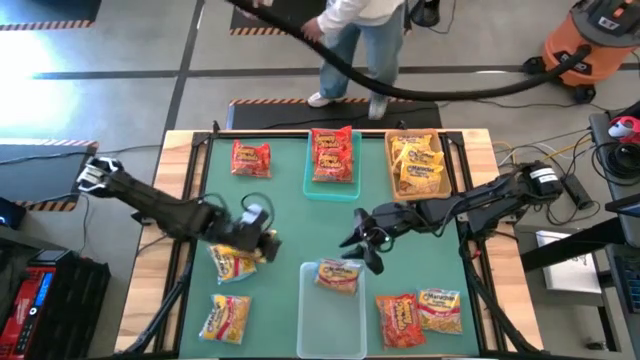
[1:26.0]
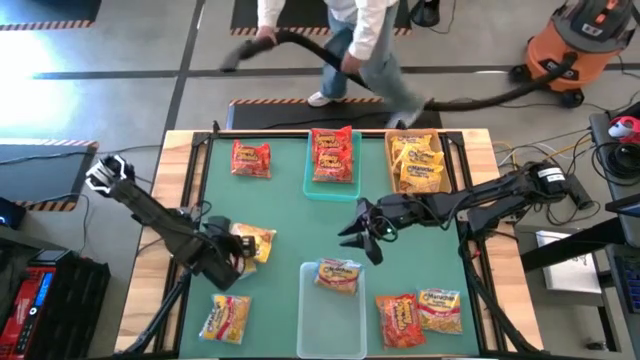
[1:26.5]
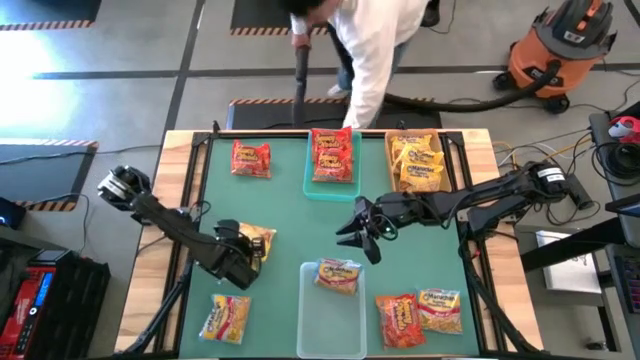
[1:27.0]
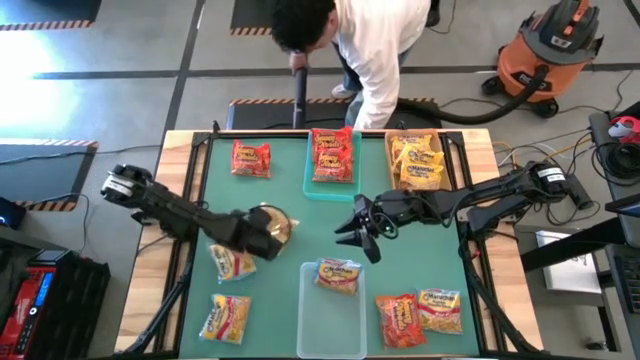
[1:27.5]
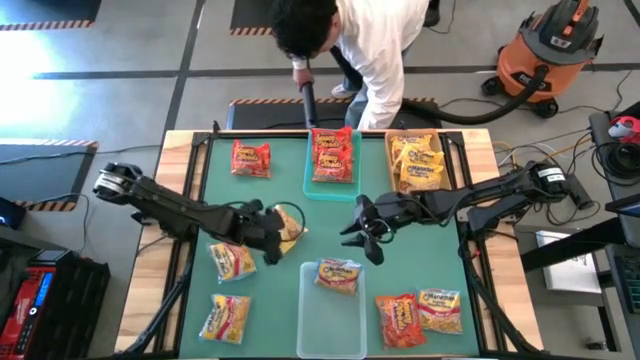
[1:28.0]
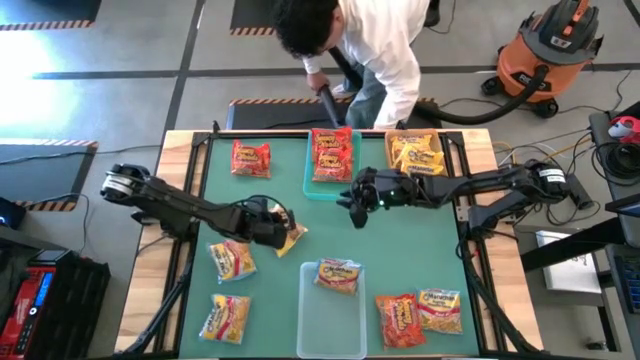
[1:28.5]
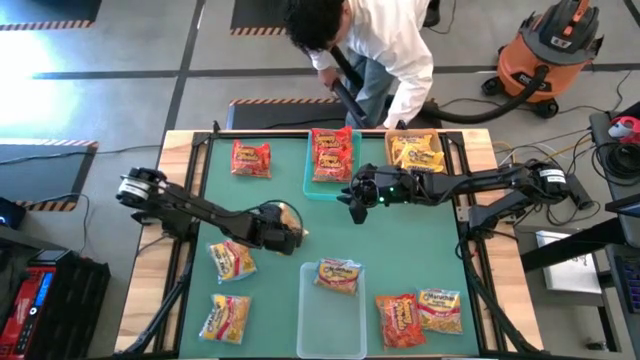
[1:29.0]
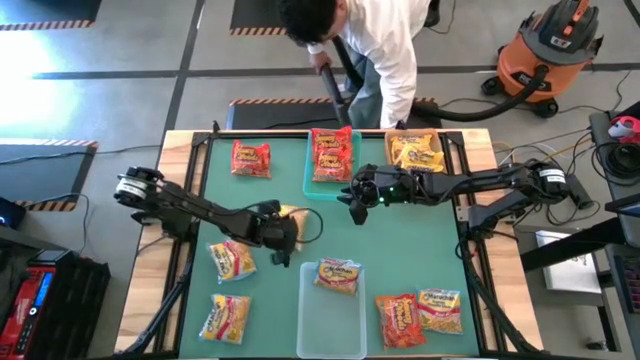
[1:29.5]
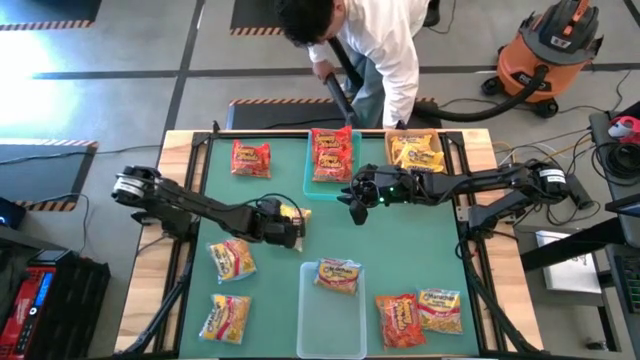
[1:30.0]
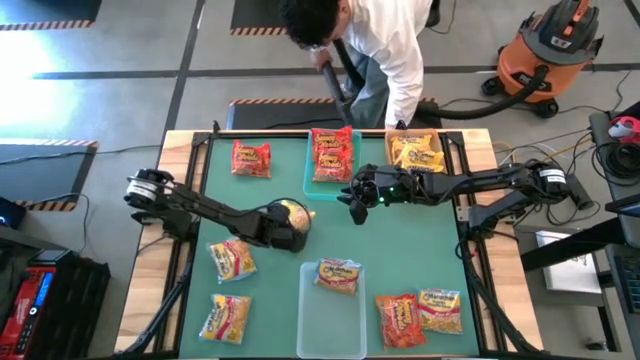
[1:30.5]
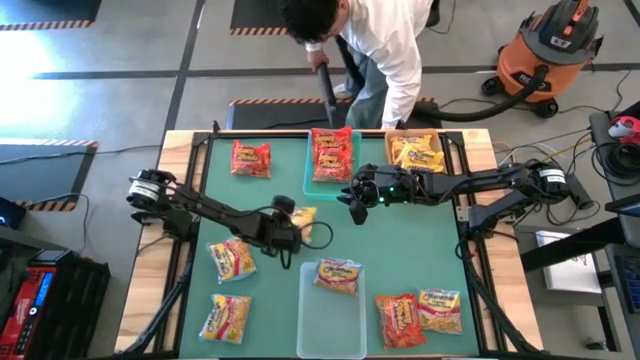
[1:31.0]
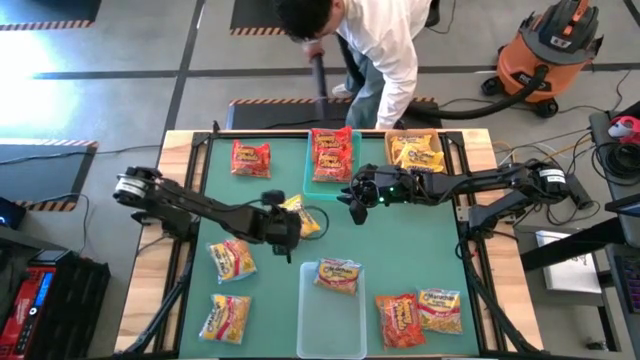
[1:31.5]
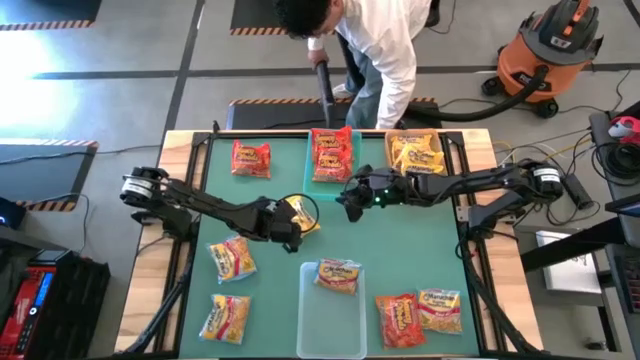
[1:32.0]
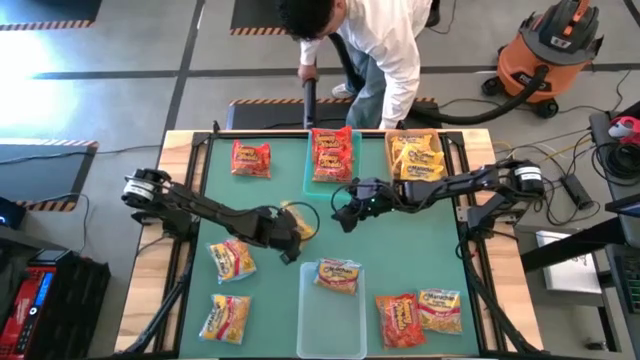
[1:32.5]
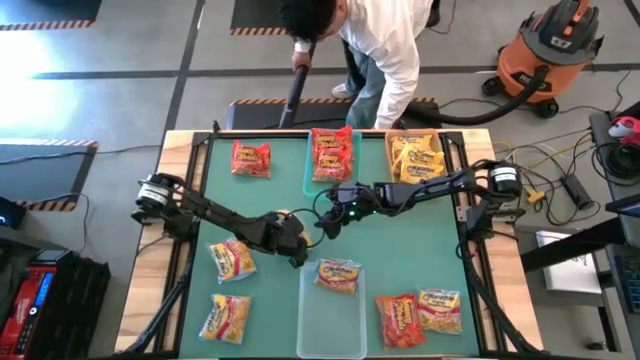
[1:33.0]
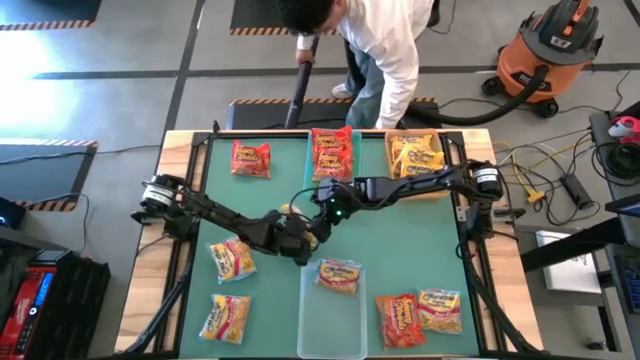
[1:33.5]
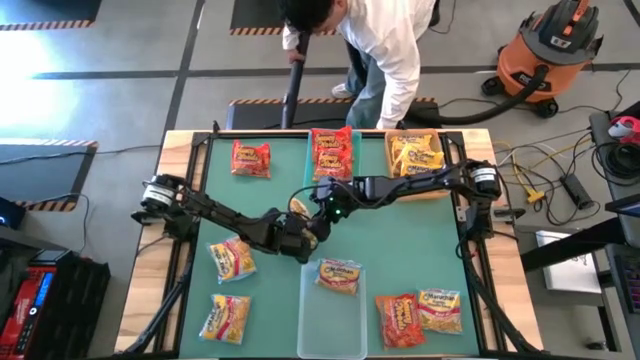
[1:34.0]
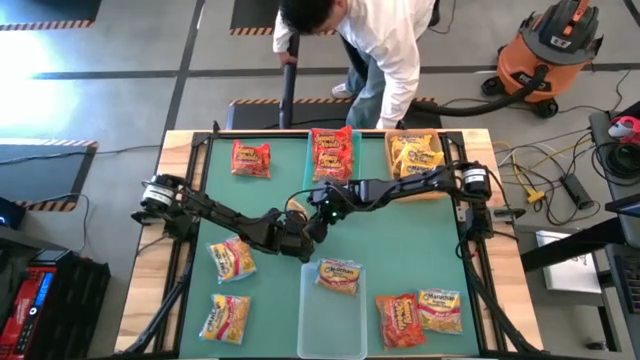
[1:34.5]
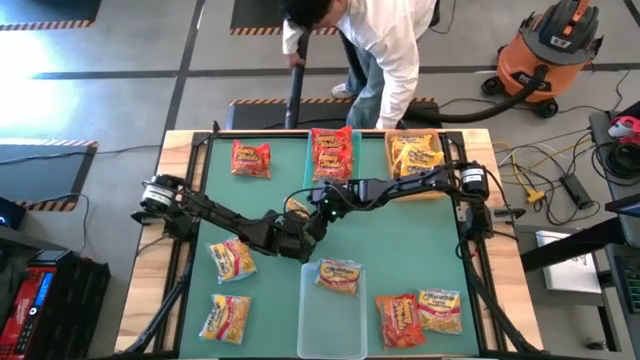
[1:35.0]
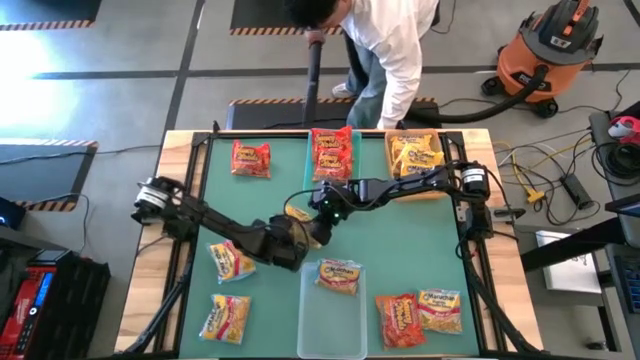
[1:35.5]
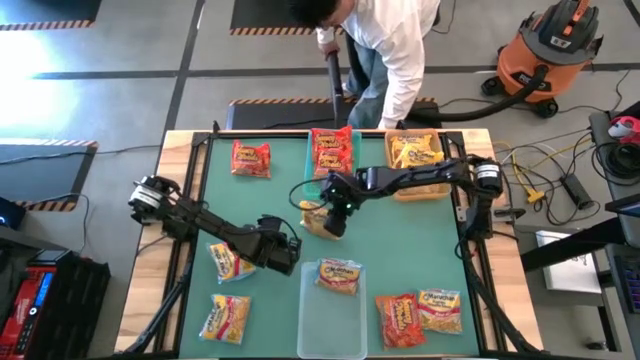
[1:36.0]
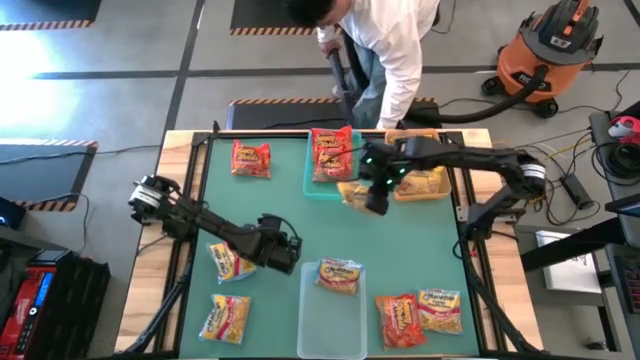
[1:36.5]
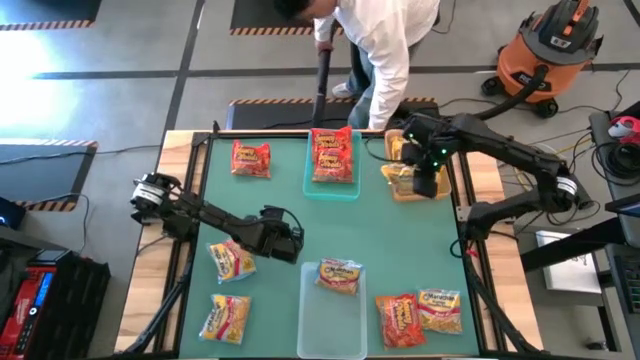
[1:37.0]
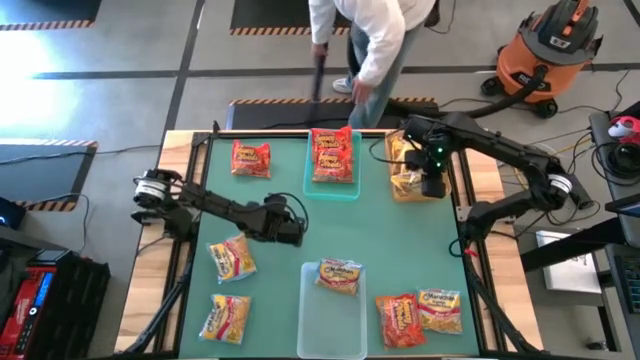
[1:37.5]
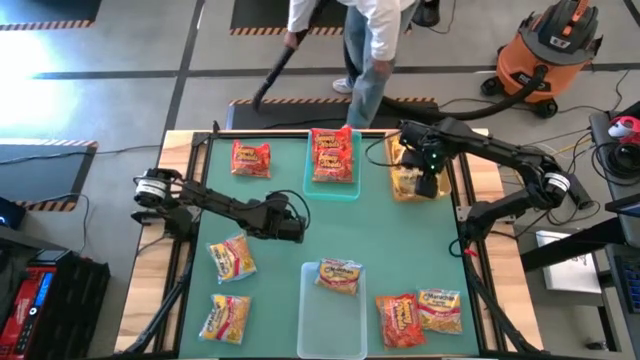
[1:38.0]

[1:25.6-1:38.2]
Task: Sort Maruchan noodles
Put the yellow noodle pack into the orange bin

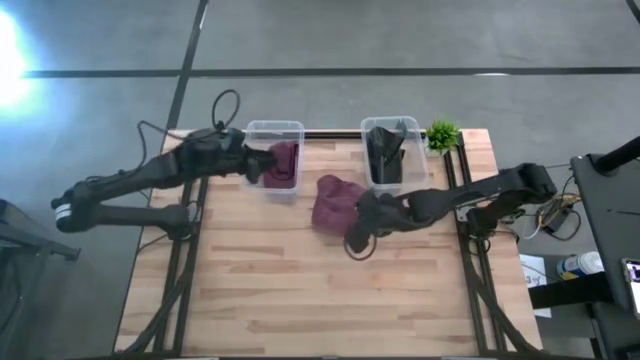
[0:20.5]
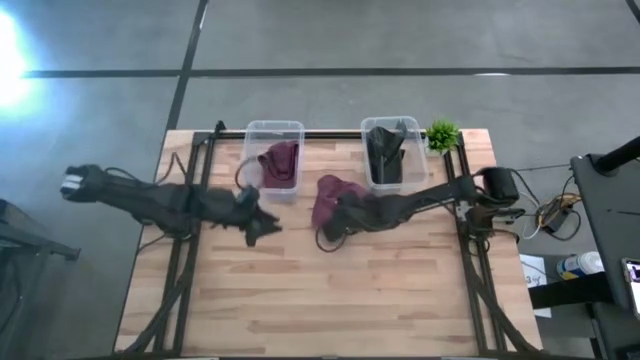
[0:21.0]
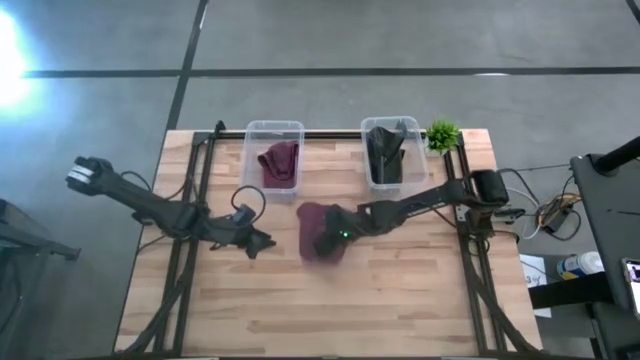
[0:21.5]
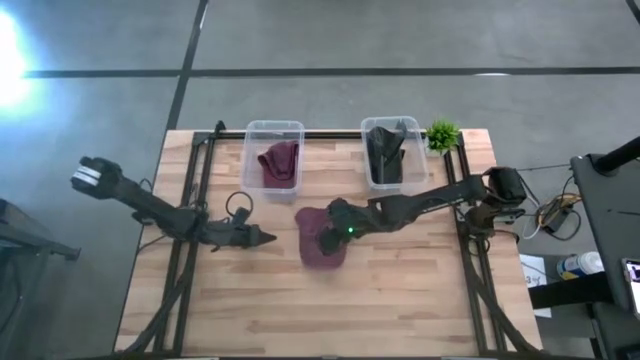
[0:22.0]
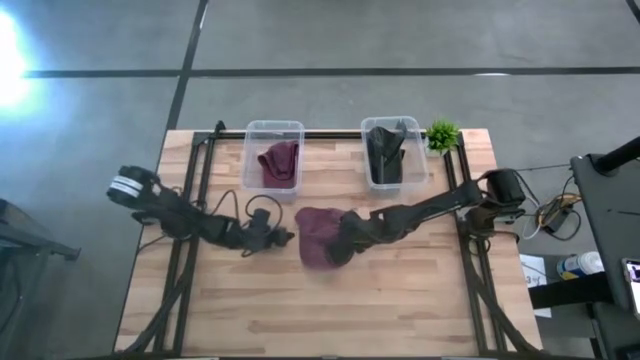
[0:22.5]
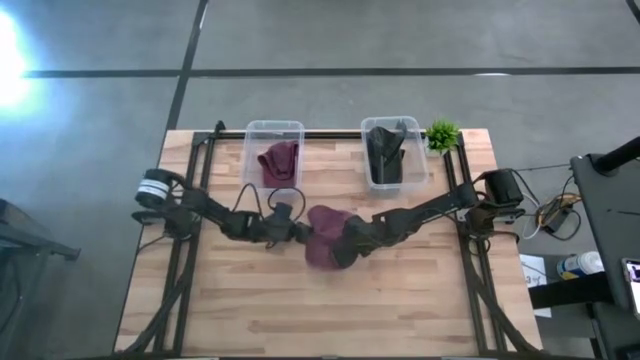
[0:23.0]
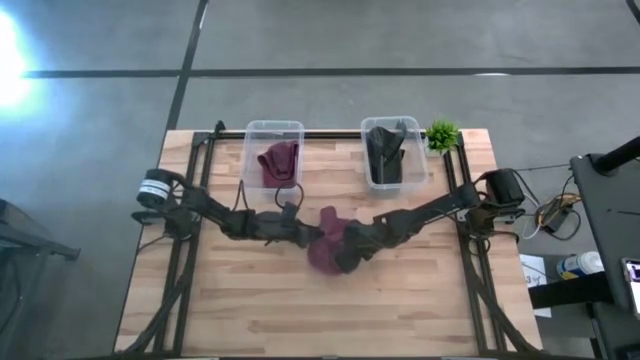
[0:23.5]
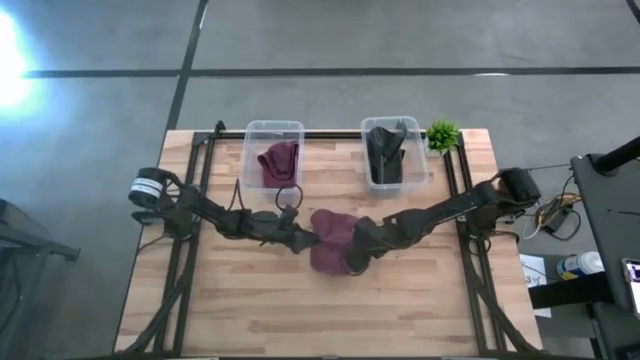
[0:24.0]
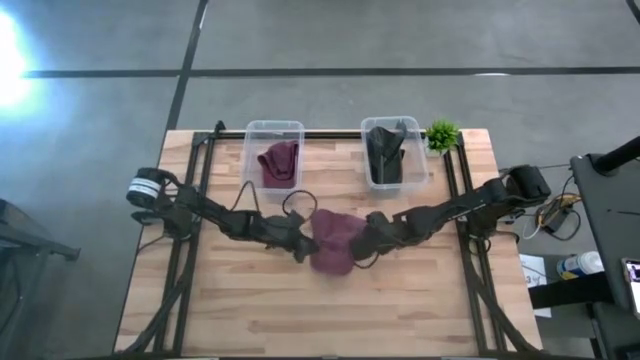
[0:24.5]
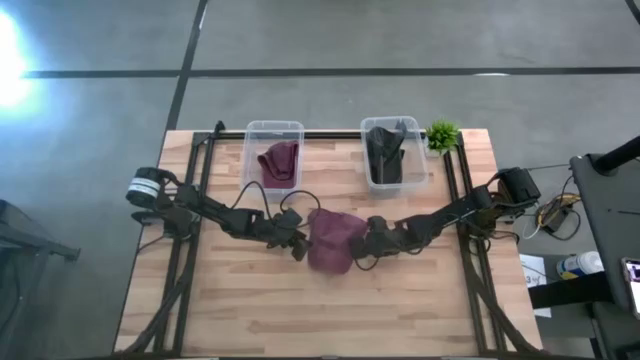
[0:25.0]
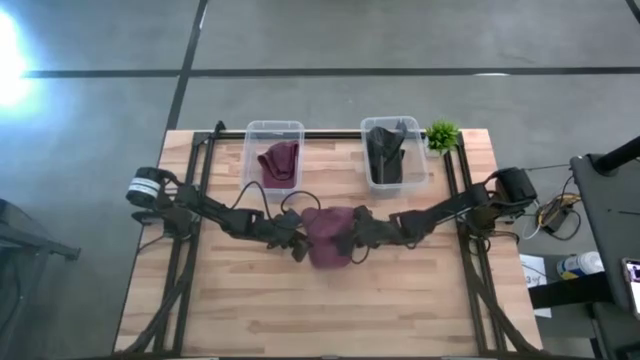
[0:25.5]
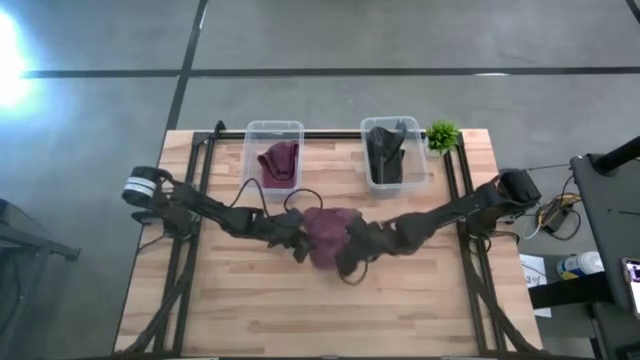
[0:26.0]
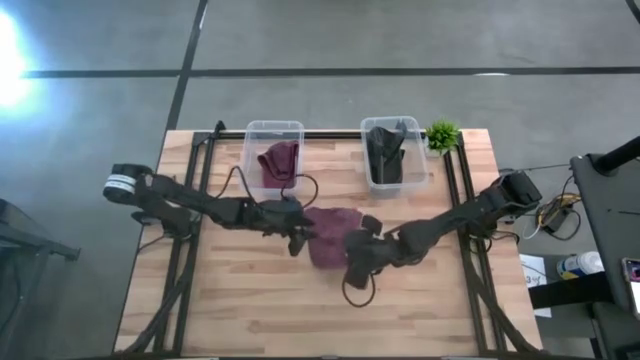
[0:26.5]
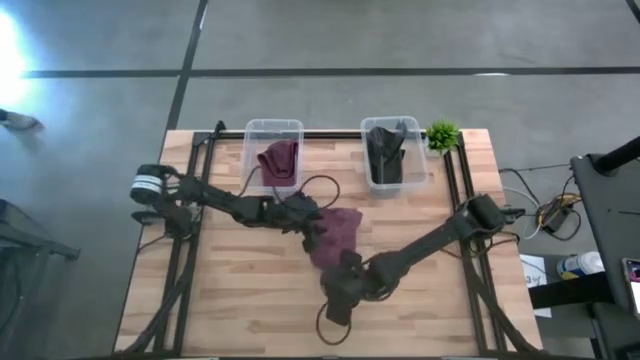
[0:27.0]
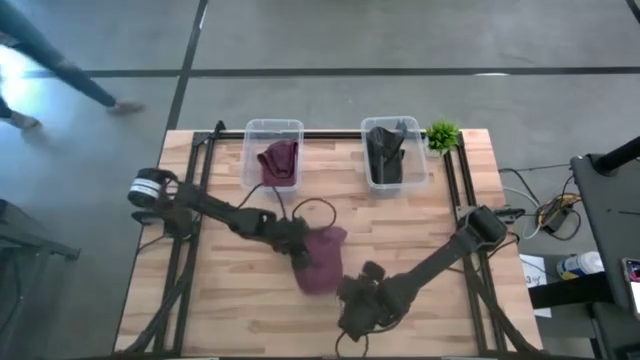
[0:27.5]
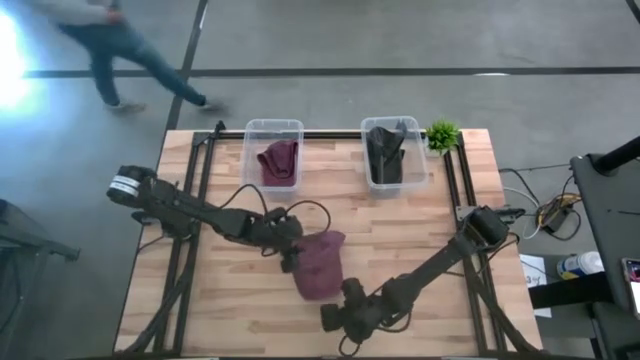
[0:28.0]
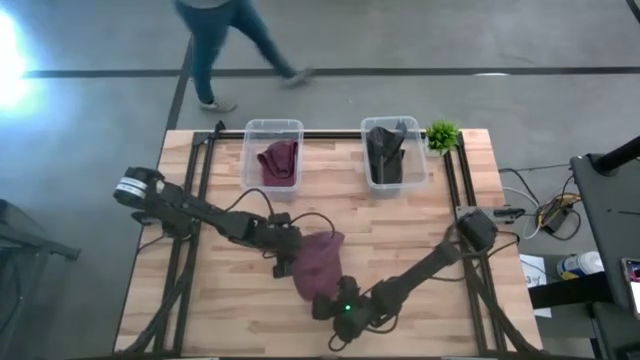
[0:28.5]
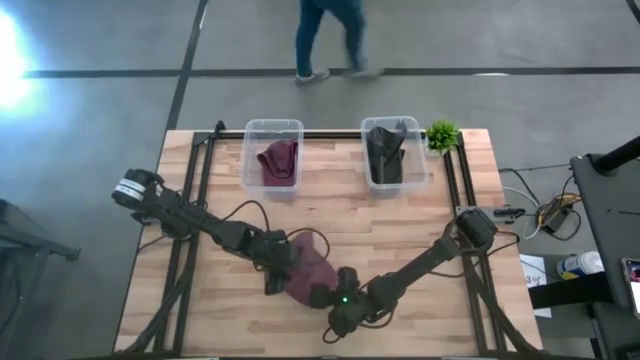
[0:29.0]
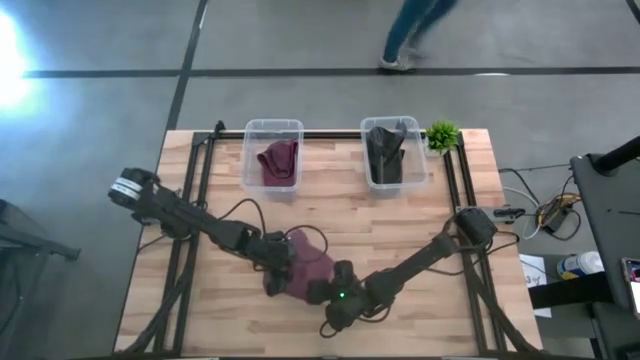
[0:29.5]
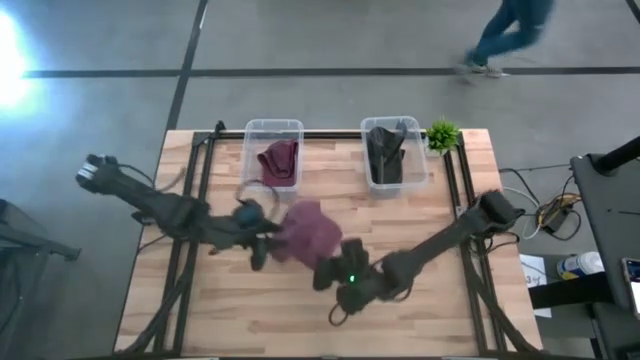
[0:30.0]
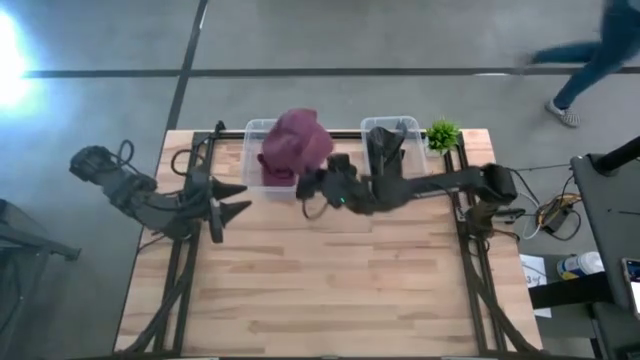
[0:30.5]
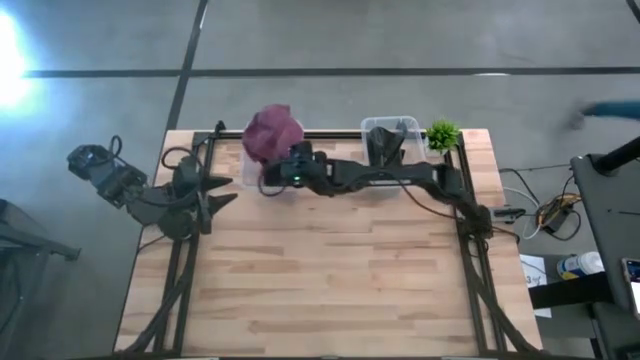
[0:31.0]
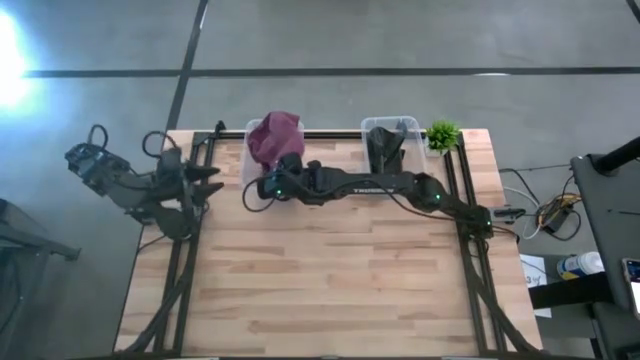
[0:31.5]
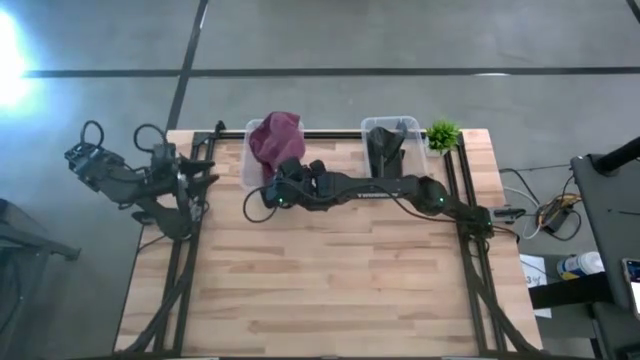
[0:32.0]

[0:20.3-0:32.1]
Task: Pick & Place hat
Put the red cap into the left transparent bin
